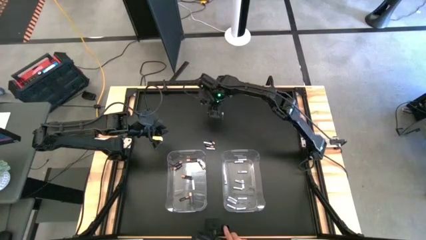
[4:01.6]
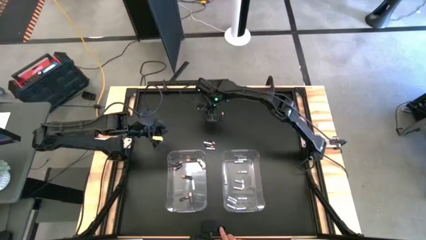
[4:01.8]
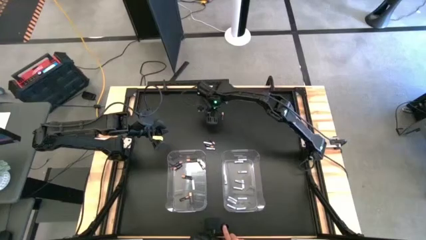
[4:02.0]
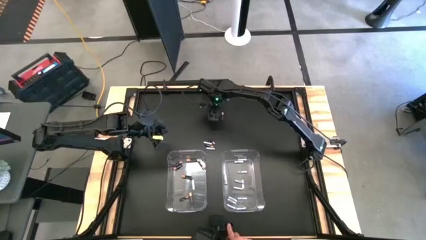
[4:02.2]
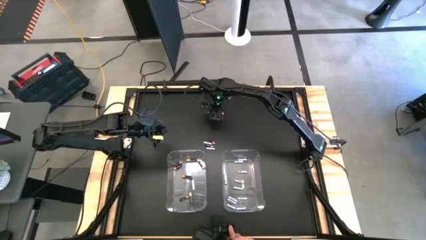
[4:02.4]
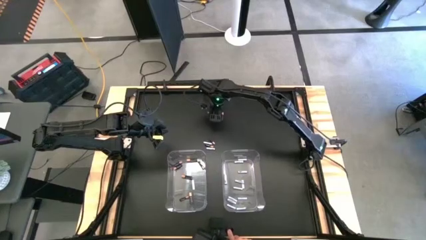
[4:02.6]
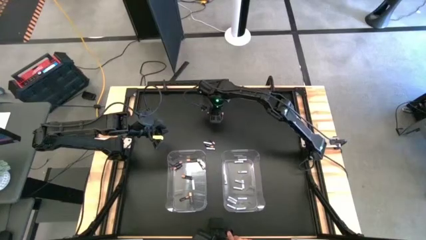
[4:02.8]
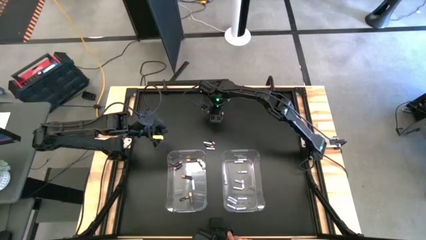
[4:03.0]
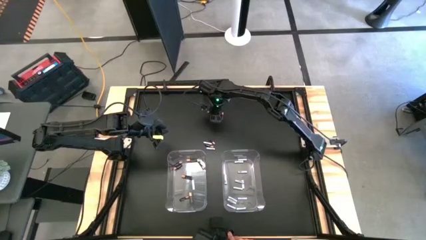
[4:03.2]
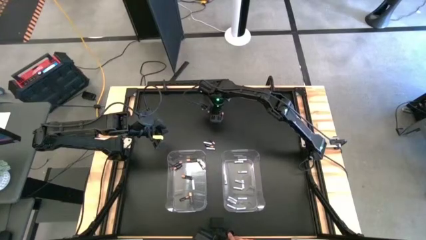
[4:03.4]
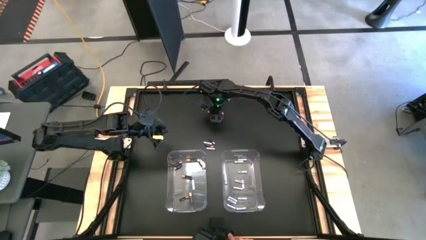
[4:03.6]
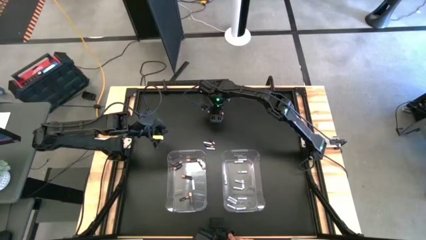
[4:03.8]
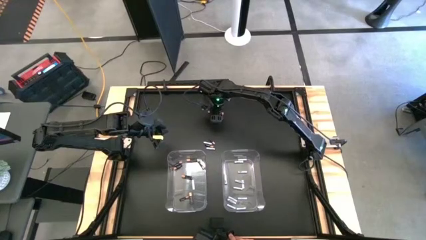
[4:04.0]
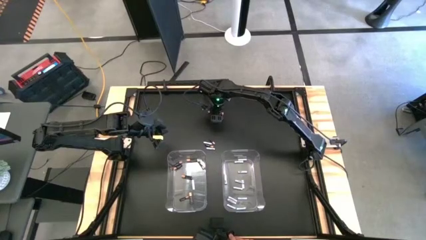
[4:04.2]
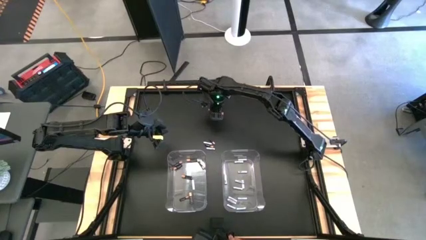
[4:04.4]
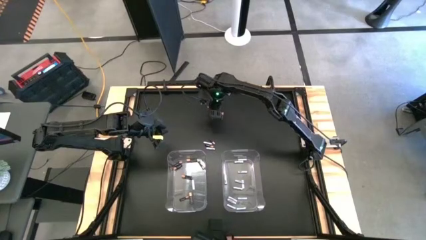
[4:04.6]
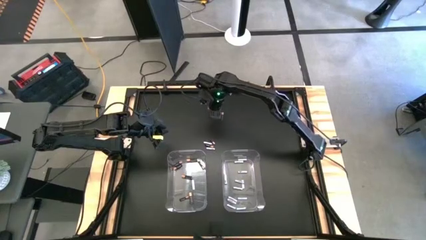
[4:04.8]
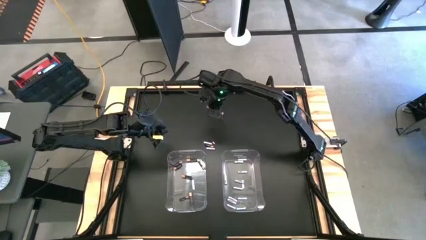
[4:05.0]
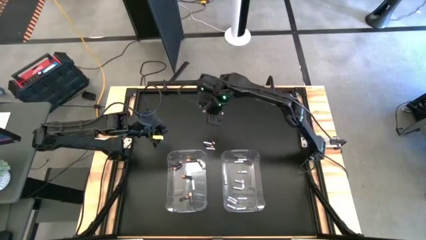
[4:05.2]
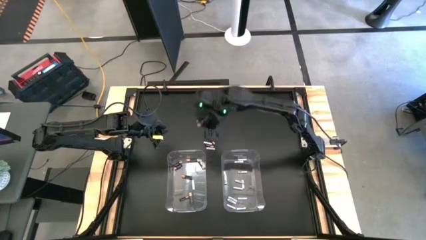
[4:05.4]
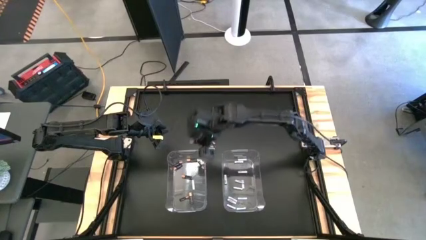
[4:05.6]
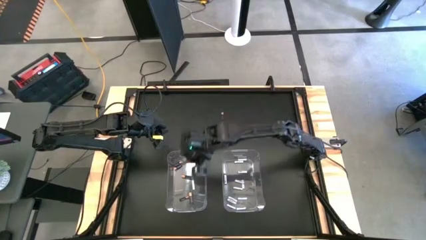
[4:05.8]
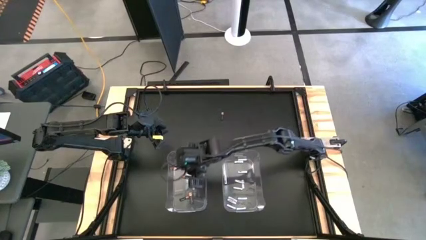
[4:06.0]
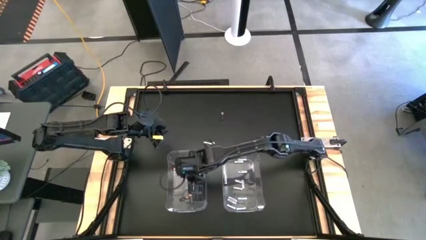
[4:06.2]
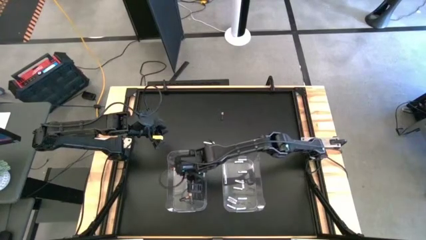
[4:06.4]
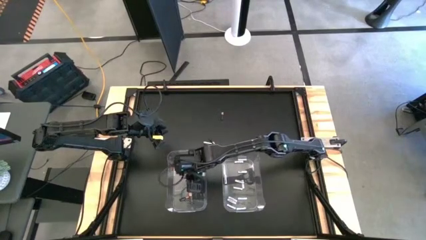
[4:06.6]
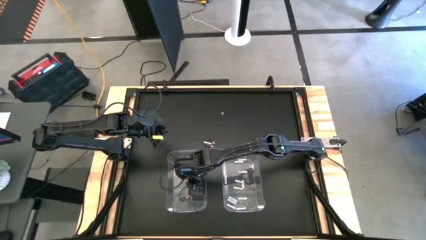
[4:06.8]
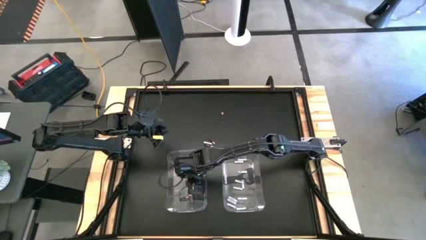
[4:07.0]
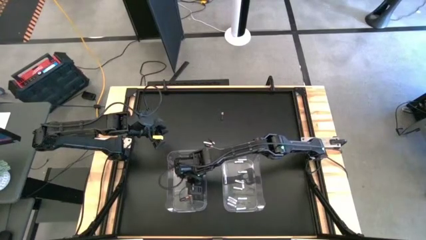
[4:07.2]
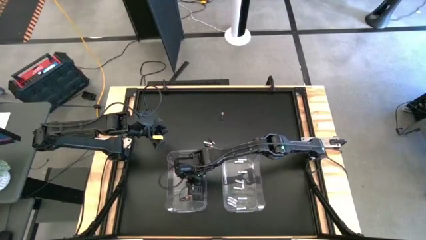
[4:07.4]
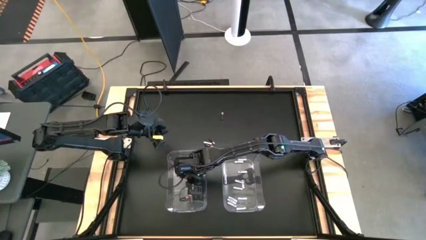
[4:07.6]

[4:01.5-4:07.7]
Task: Sort batteries
Put the black battery into the left transparent bin

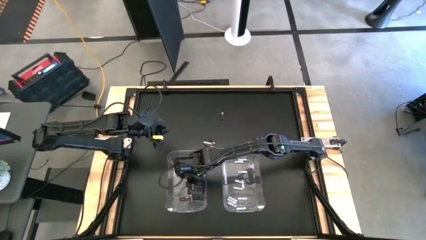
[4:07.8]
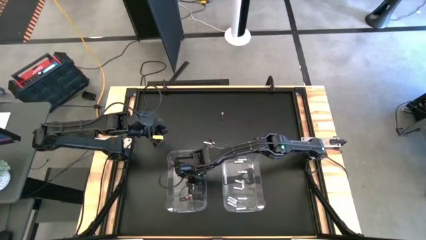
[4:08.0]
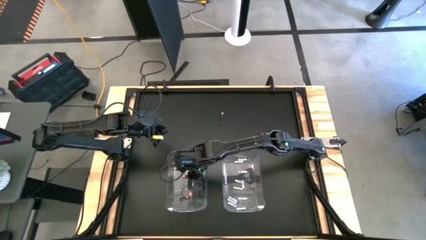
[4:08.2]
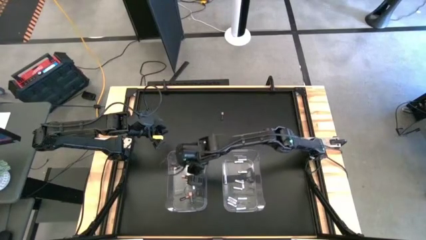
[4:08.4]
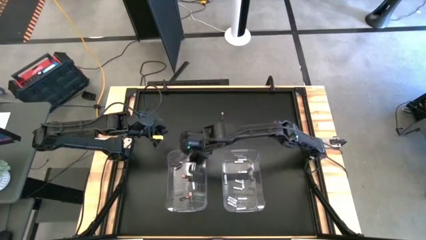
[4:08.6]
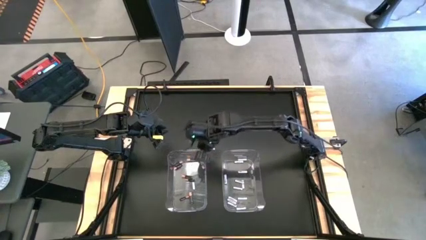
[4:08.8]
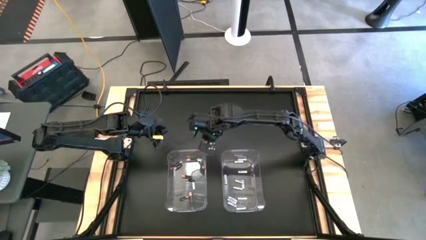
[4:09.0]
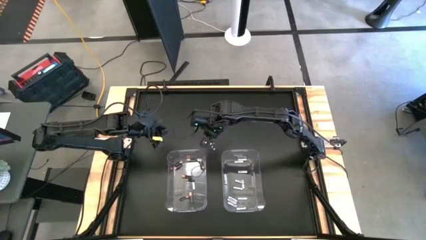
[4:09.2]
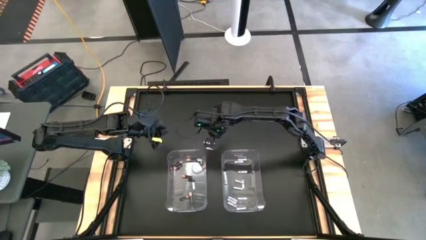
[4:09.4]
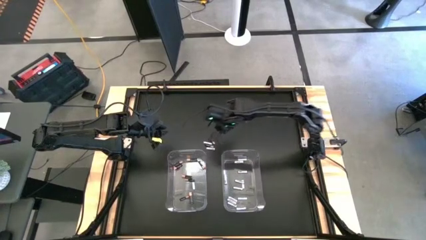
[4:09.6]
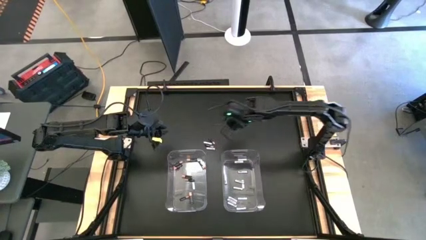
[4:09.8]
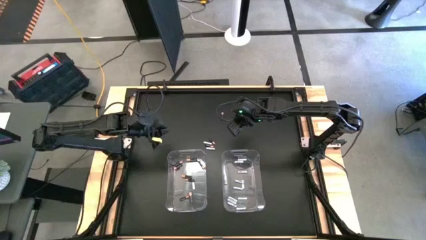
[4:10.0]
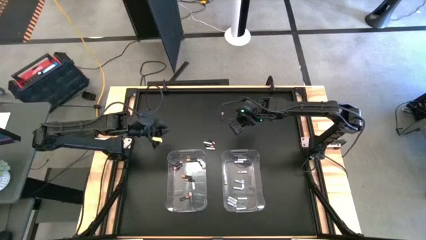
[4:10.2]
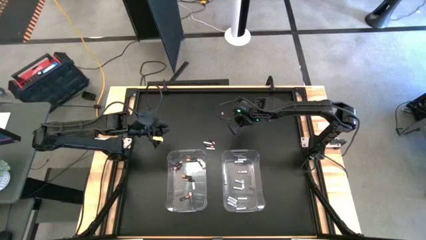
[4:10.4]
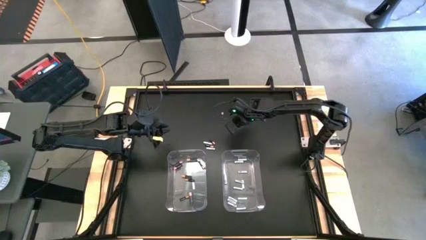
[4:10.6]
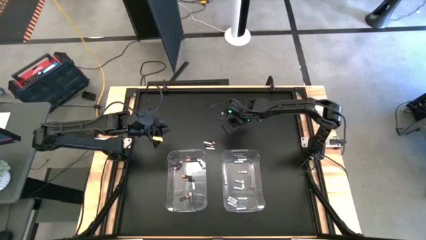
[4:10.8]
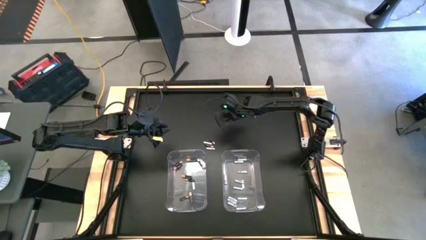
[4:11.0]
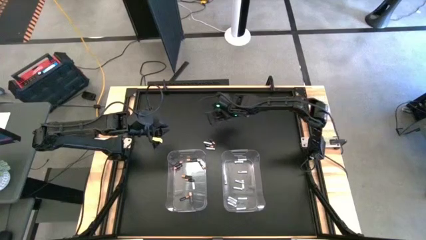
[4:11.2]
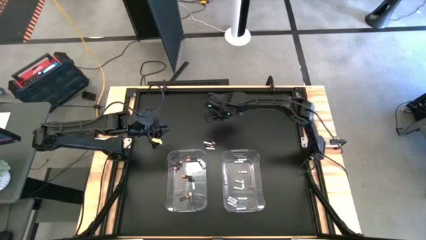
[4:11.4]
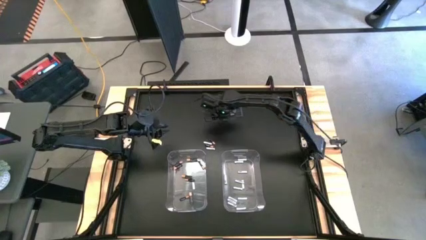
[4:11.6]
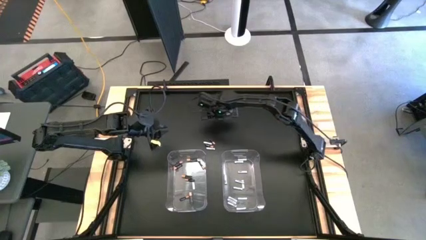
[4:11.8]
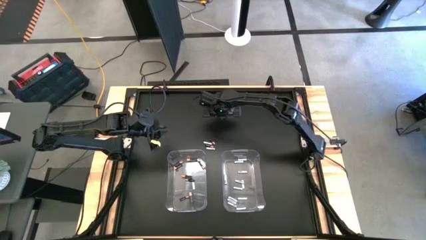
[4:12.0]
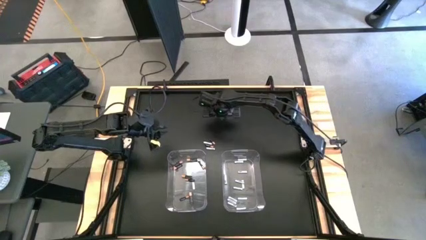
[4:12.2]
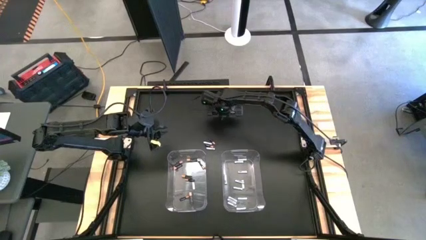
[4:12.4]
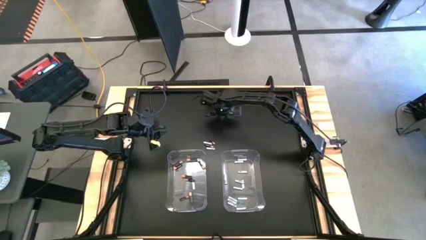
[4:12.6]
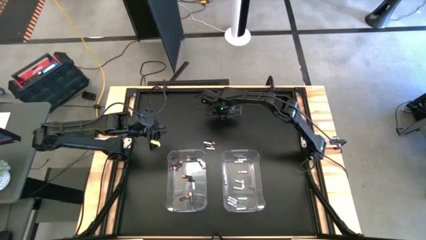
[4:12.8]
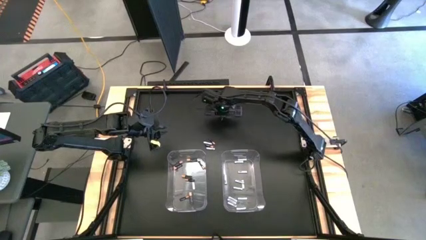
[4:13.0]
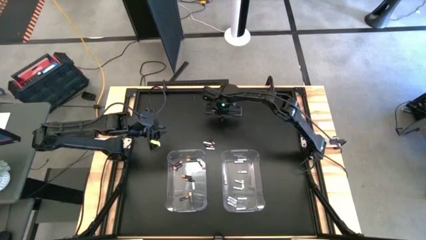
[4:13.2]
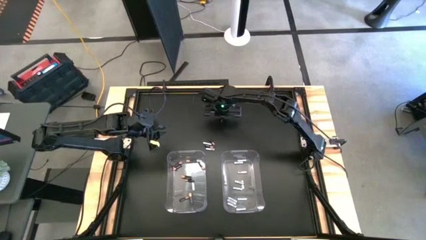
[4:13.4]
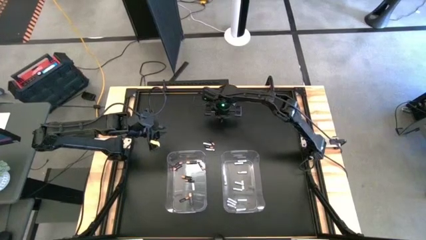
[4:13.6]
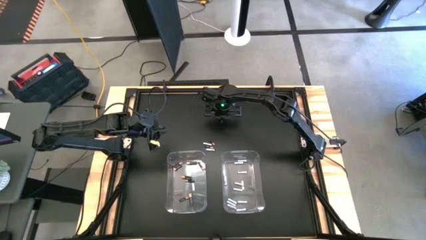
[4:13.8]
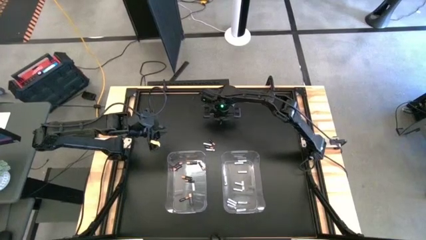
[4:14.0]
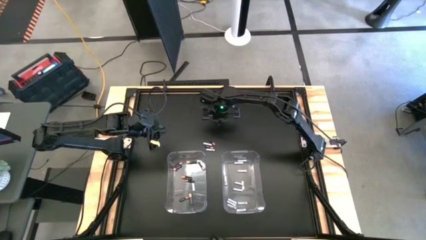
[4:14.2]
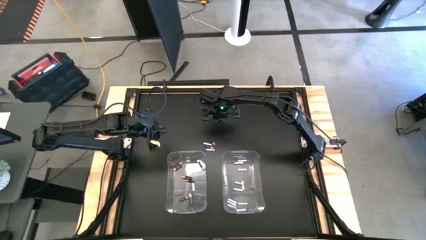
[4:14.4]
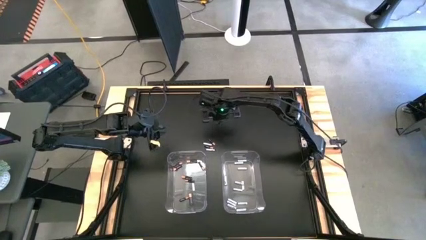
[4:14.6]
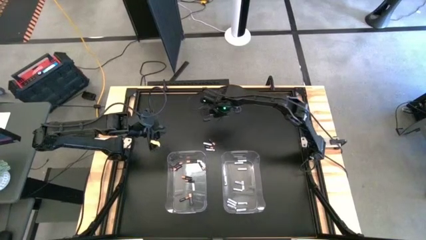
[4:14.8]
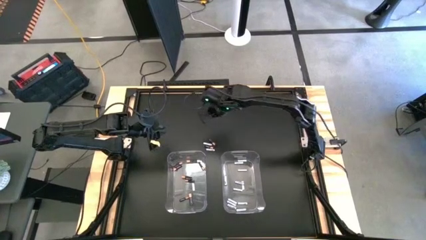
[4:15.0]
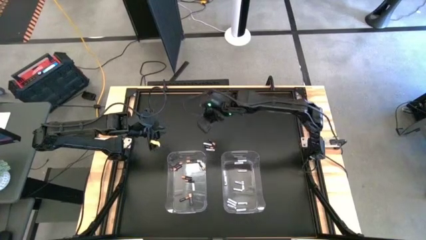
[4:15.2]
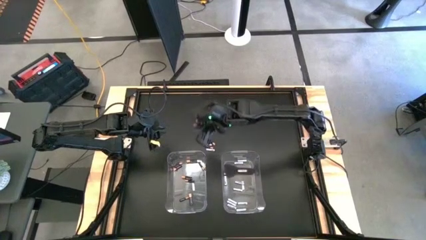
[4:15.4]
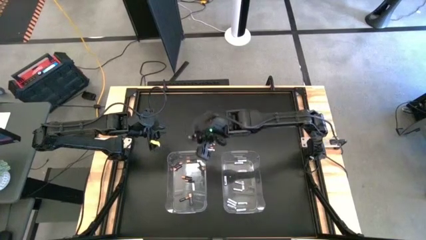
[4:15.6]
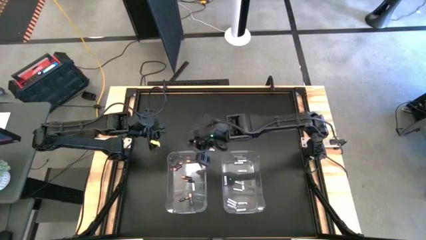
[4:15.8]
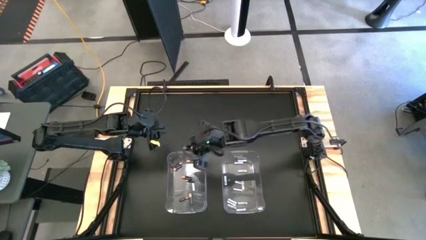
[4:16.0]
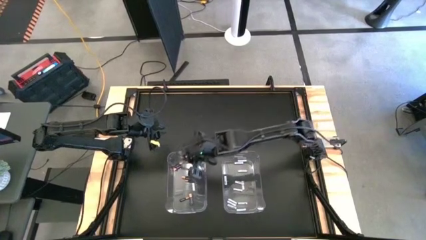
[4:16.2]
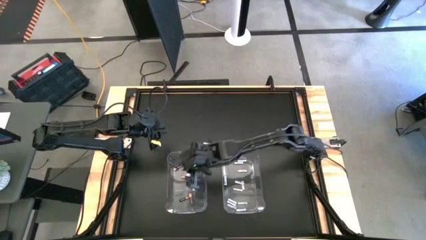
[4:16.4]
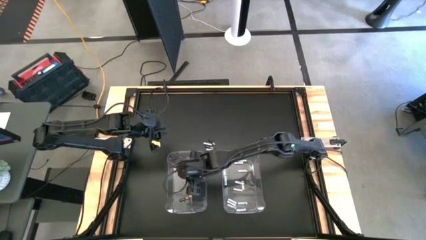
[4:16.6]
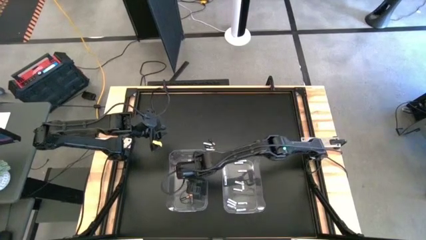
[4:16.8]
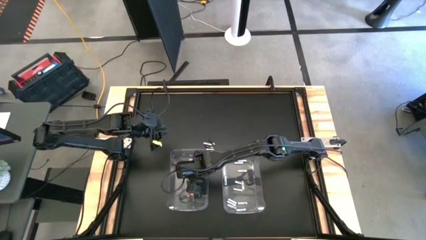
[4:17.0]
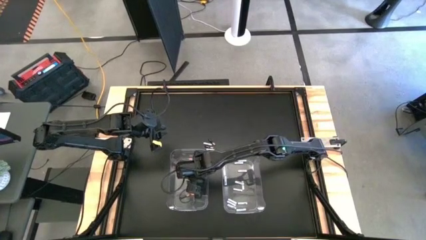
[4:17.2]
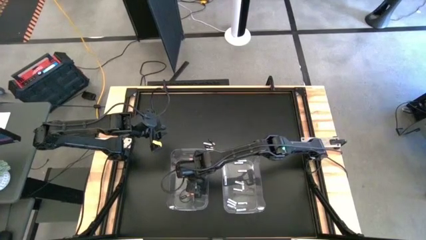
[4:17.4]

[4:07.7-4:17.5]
Put the black battery into the left transparent bin
